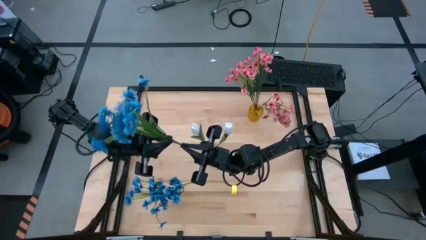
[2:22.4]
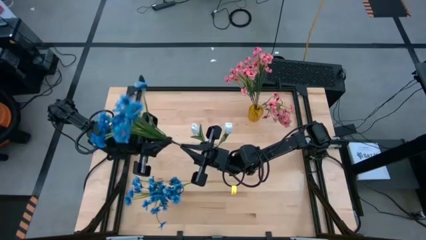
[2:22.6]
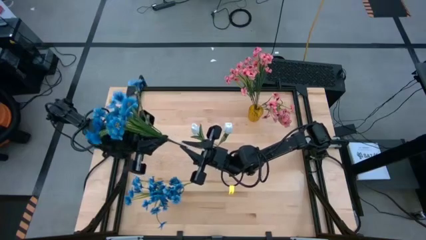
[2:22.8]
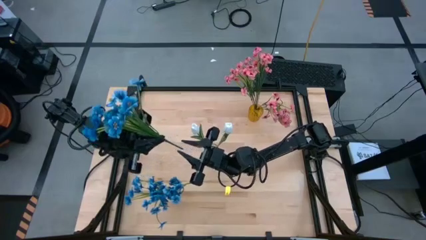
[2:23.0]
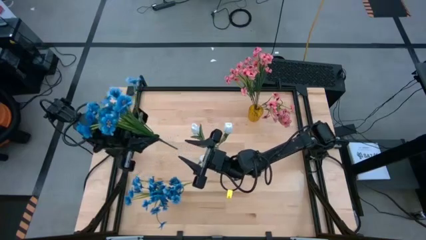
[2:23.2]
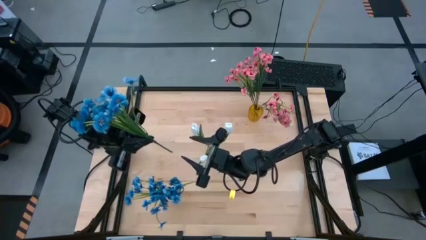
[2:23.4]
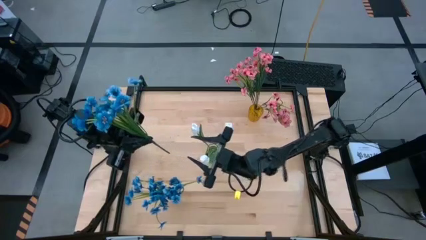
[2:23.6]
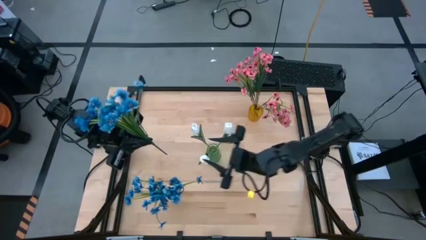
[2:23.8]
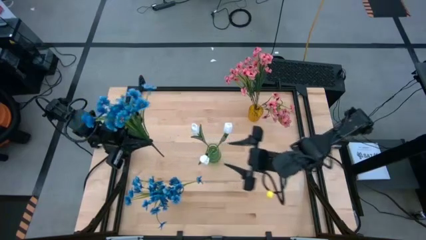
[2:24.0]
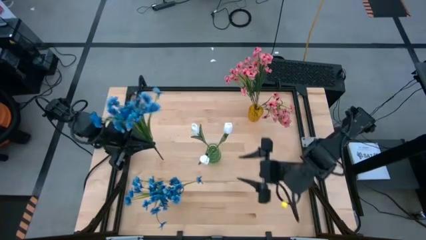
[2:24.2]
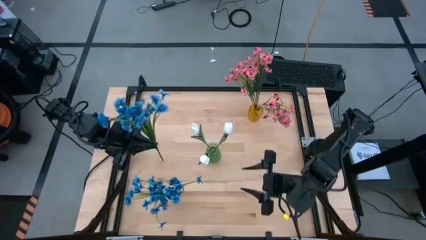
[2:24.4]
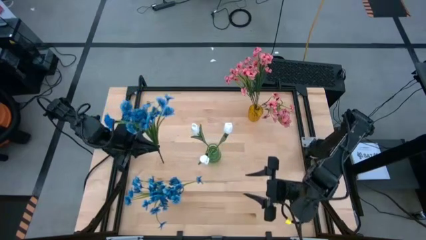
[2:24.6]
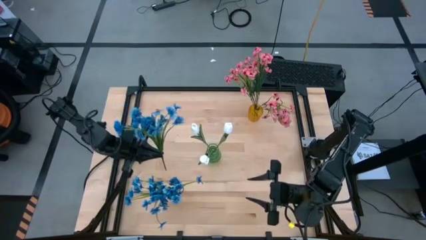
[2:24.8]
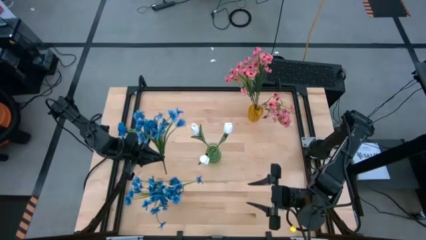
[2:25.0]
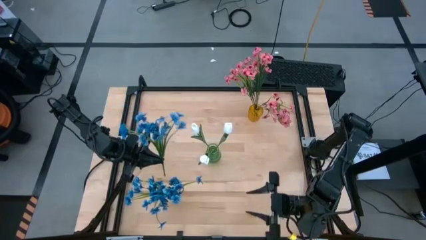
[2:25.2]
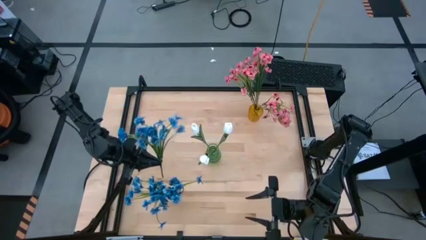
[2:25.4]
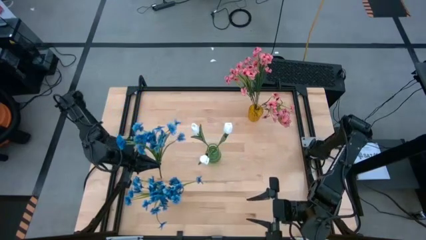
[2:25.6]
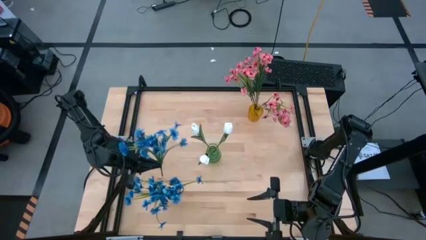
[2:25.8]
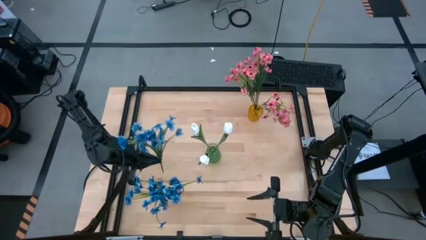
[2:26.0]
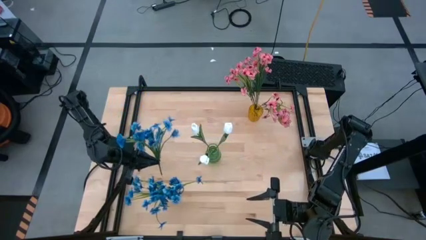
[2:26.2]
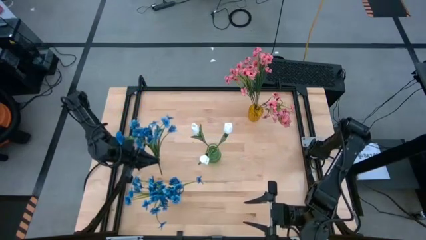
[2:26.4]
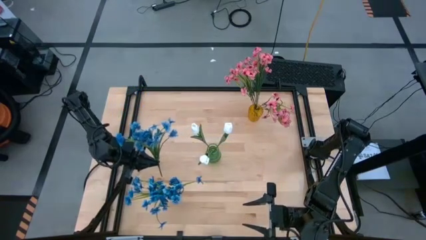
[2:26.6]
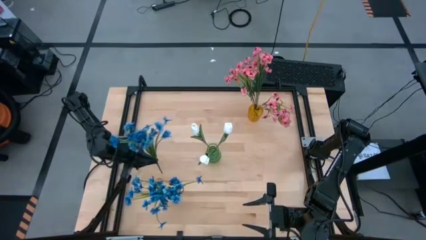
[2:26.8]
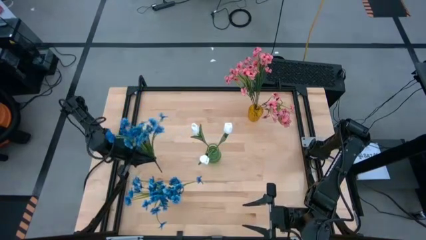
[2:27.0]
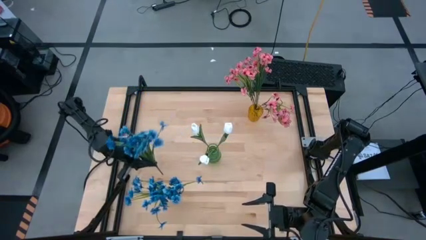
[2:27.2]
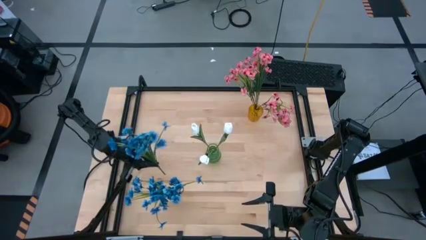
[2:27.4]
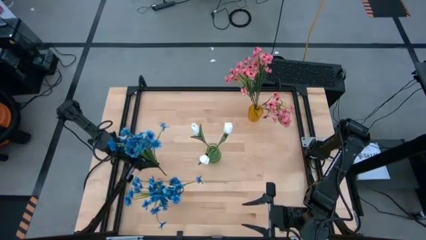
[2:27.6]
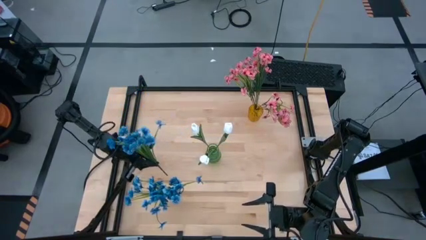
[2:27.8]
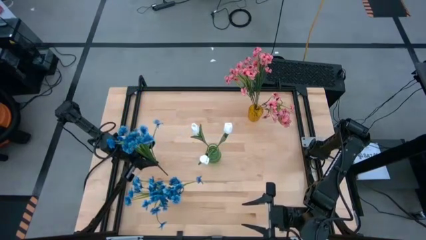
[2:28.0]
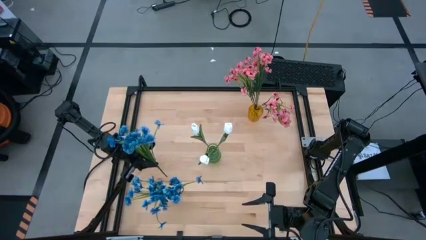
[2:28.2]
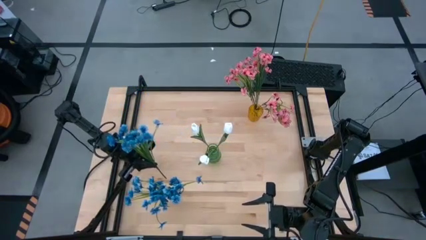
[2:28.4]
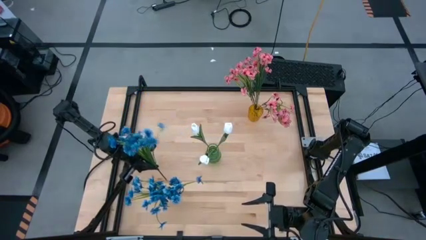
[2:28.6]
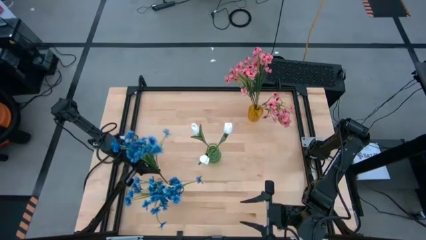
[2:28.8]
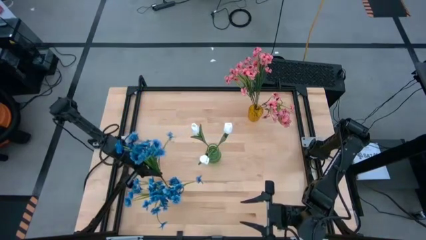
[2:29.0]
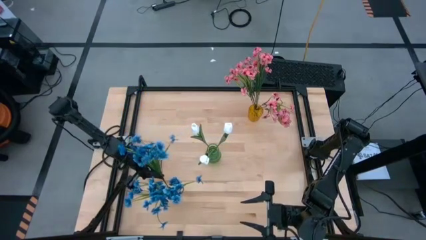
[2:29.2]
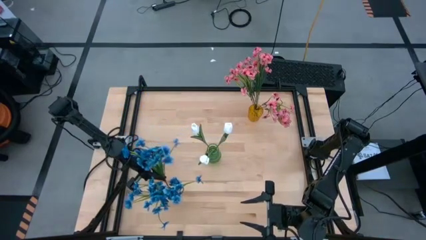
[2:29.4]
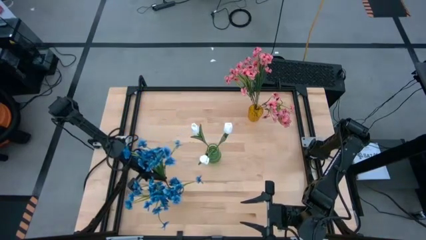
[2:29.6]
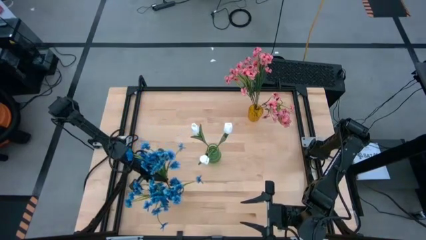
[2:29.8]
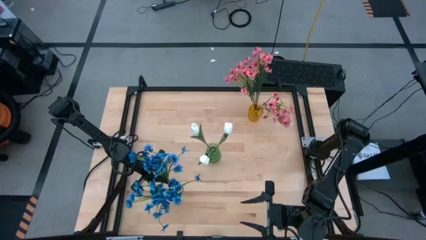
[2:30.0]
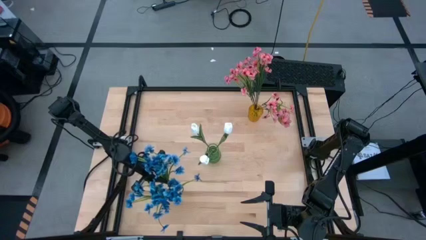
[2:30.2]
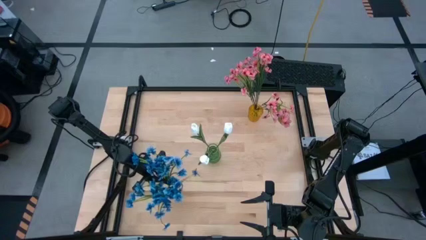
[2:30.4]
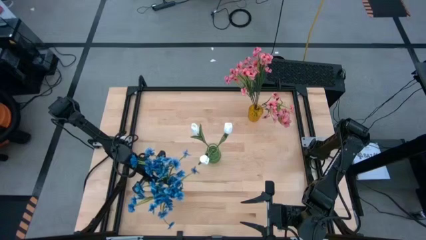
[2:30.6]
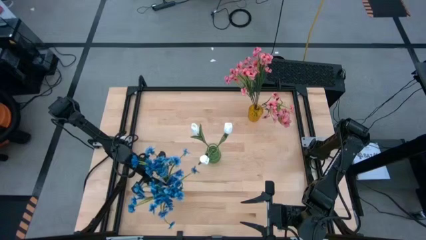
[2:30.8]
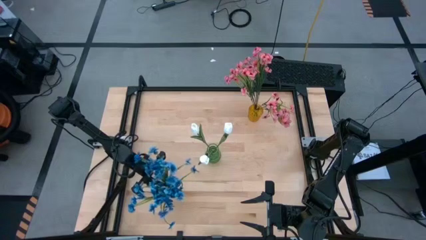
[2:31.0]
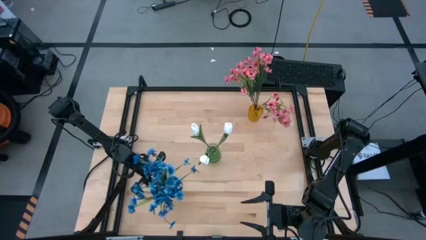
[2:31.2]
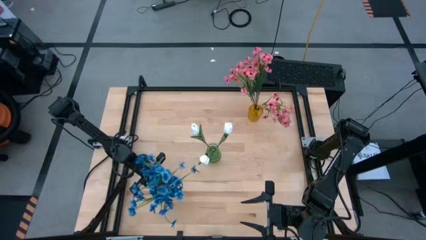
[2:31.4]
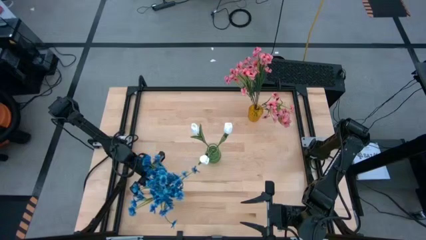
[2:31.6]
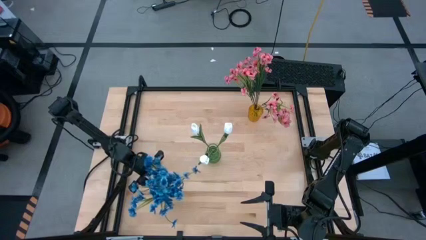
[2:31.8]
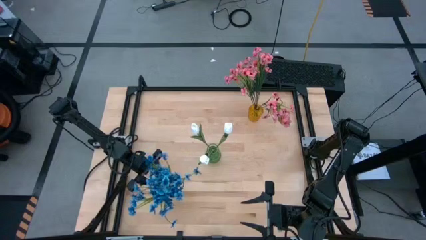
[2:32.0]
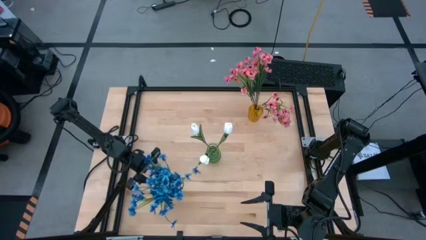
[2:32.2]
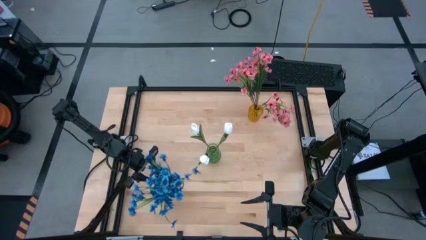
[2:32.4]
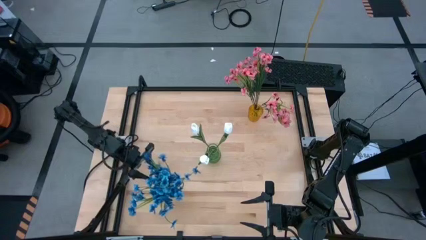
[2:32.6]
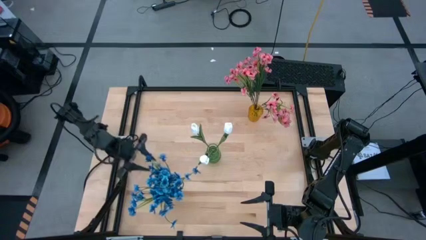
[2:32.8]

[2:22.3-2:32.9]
Task: Sort flowers into vase by color
Put the blue flowers into the transparent vase
